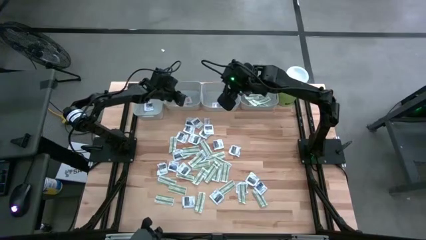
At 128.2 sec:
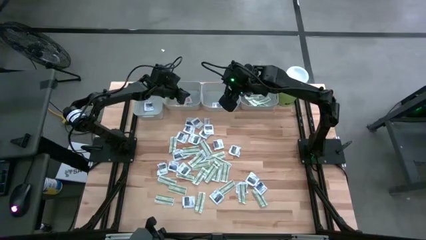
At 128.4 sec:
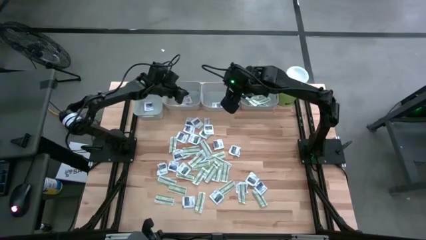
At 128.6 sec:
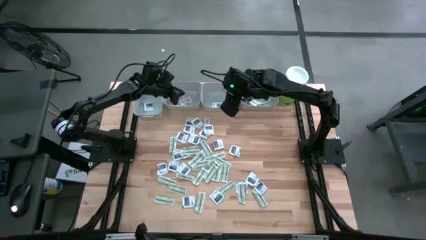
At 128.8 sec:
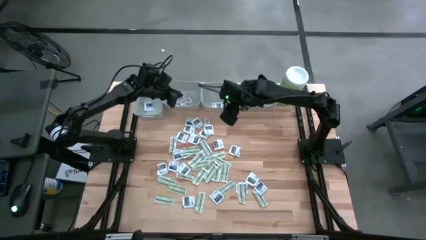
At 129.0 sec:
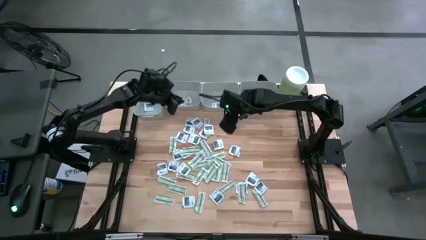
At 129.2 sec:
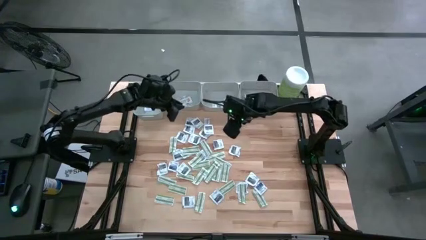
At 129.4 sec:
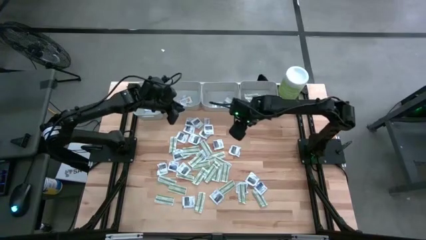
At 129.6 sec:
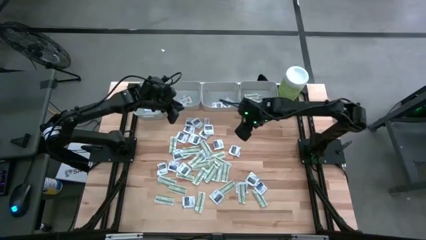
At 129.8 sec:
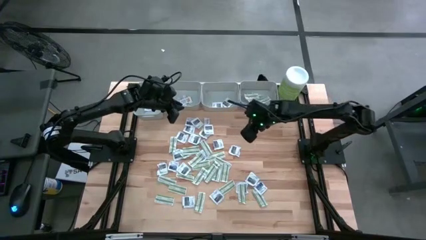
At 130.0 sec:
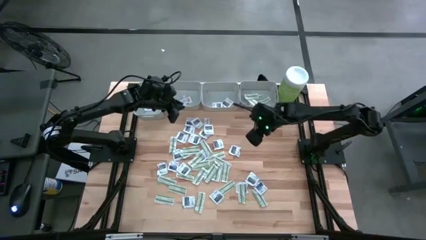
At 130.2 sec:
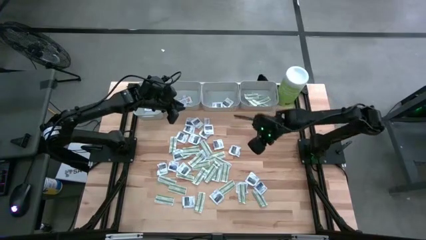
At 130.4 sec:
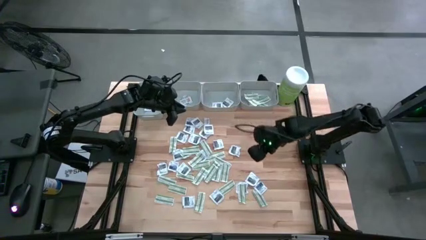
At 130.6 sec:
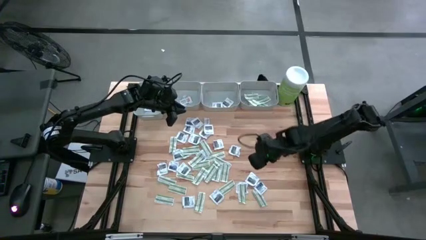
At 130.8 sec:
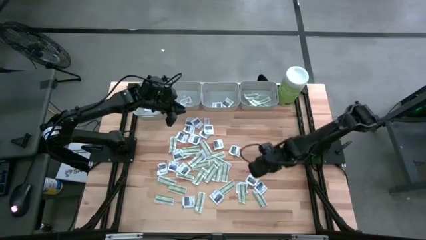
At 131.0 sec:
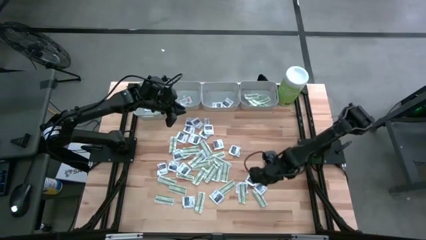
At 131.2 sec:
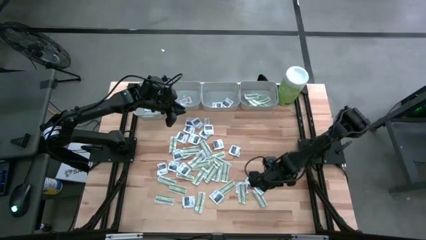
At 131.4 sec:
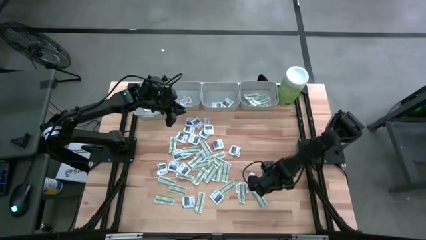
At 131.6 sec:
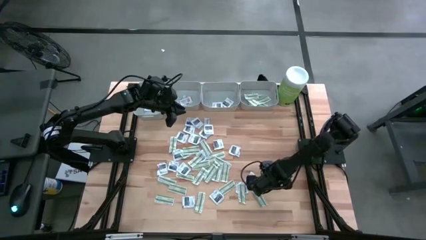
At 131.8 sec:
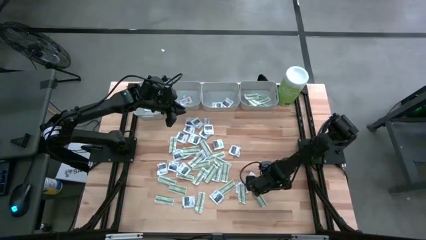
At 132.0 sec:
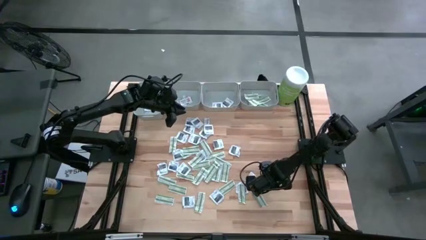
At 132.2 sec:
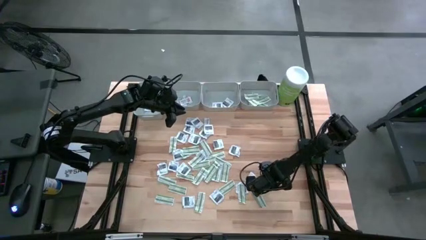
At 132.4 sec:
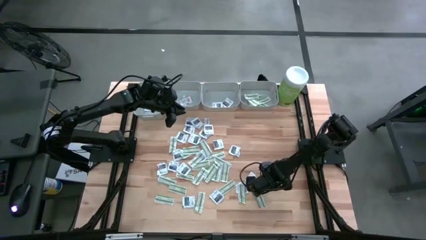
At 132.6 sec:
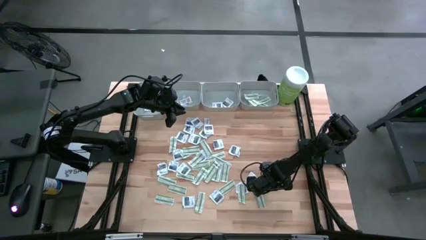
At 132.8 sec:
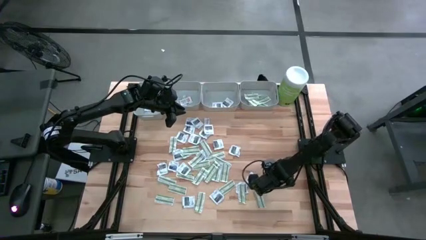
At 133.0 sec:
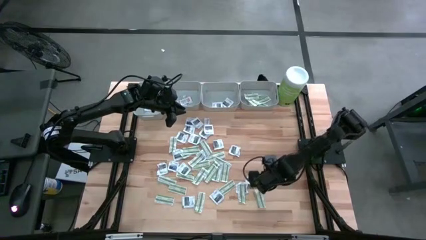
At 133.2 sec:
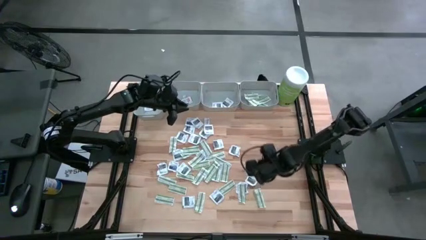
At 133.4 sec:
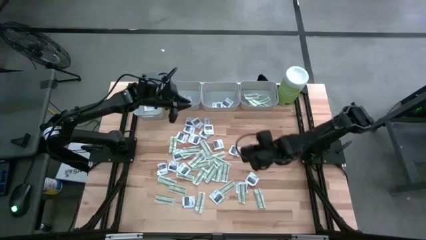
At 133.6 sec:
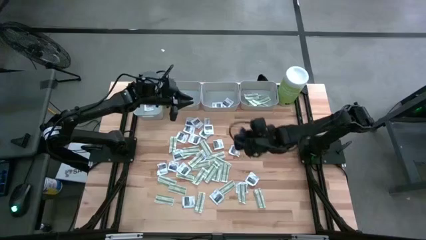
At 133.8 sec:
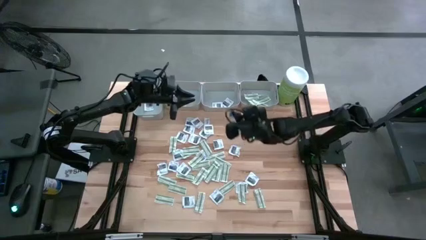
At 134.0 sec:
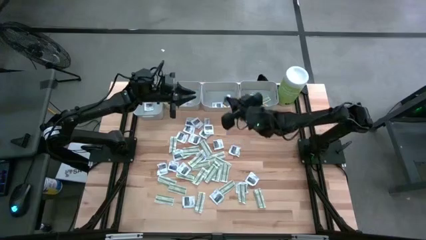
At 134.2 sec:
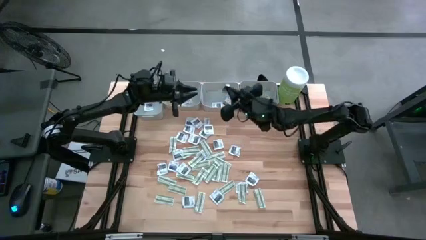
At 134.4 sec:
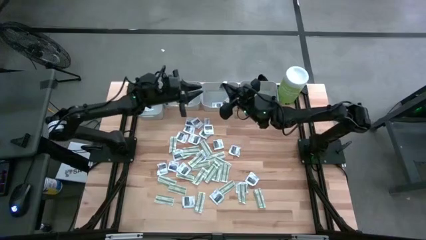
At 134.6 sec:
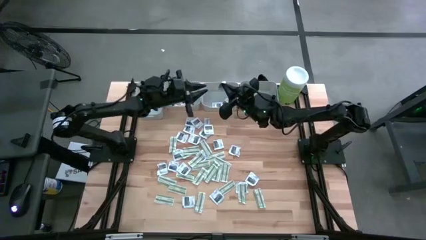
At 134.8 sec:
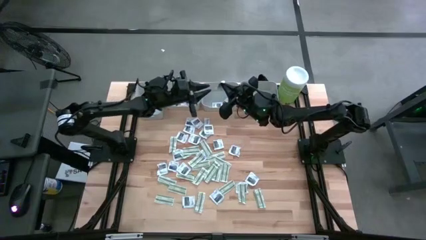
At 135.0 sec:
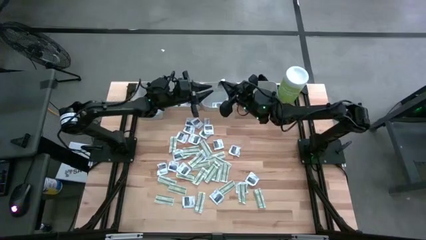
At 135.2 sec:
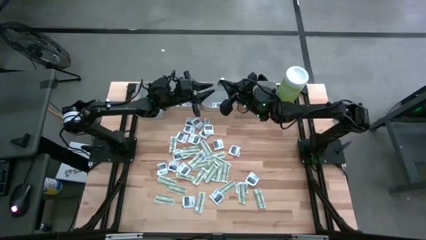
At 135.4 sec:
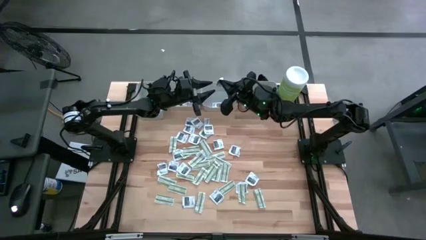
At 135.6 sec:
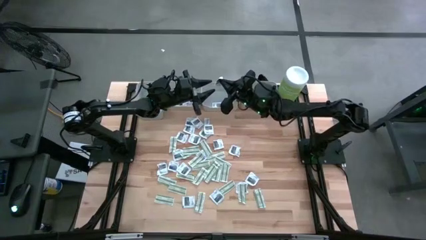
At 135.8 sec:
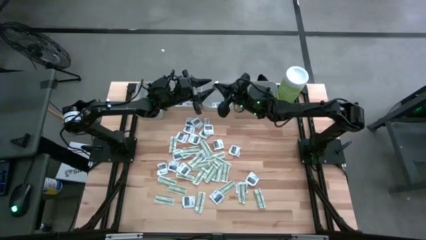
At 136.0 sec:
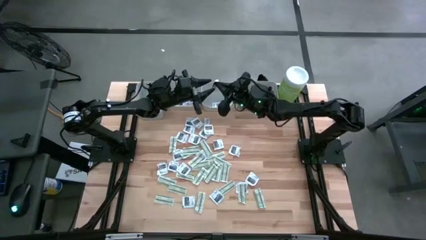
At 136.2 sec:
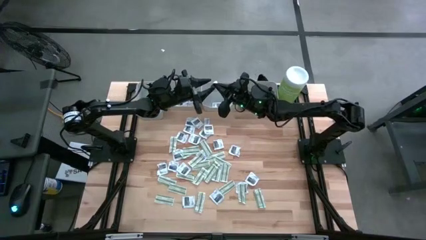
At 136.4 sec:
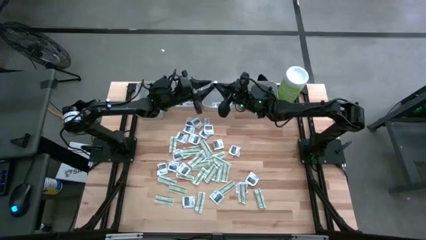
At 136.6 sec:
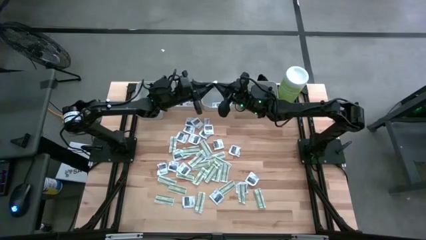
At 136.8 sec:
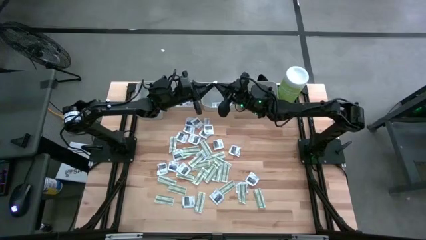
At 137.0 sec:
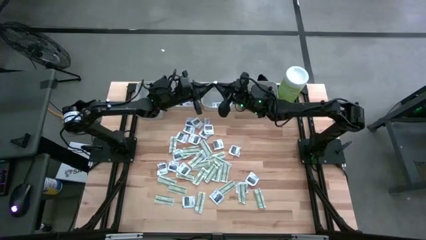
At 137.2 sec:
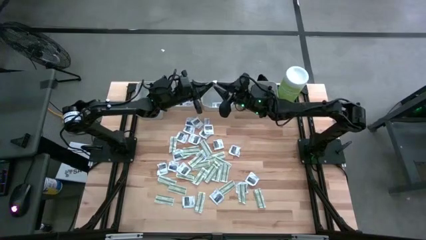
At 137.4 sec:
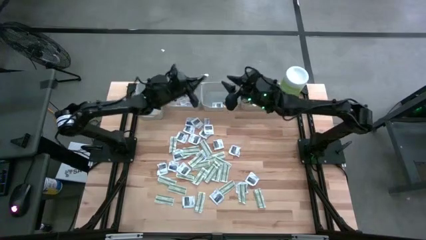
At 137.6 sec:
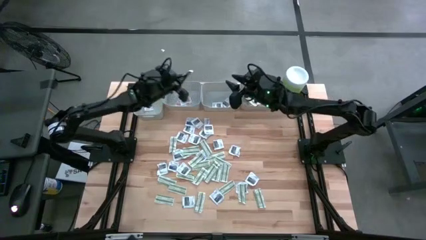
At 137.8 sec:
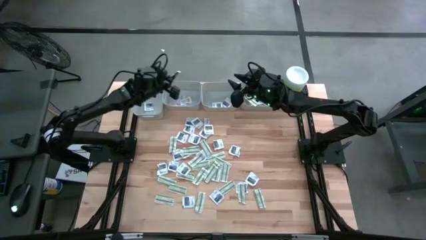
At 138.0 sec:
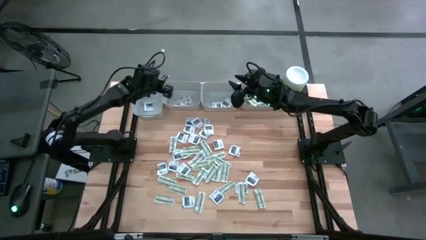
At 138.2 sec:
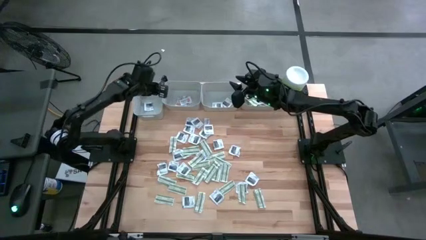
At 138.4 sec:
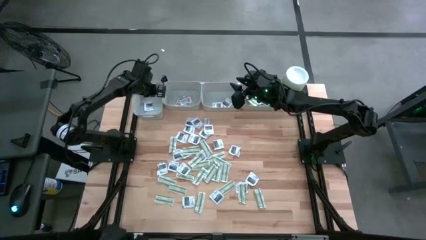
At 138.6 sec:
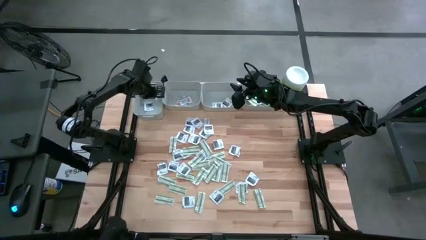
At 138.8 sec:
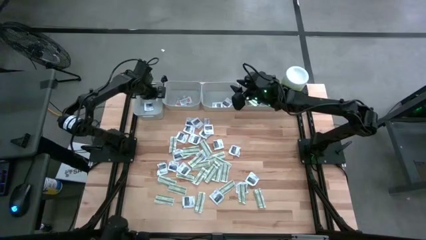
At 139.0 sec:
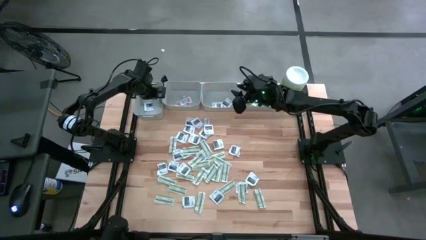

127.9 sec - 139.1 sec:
Task: Pick & Place First Aid Supplies
Put the blue alcohol pad into the left gray bin

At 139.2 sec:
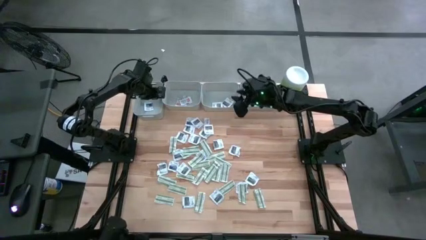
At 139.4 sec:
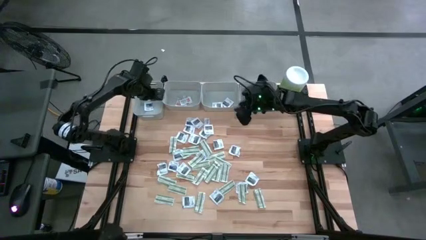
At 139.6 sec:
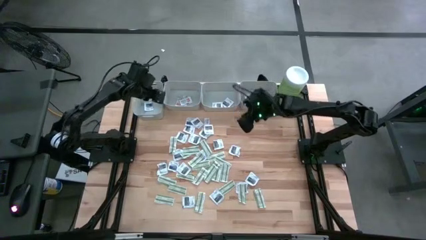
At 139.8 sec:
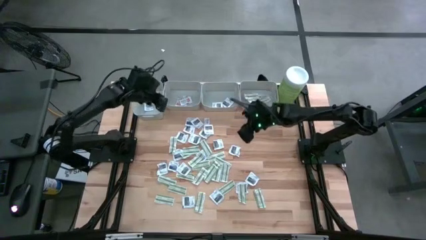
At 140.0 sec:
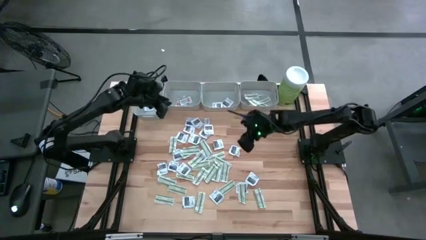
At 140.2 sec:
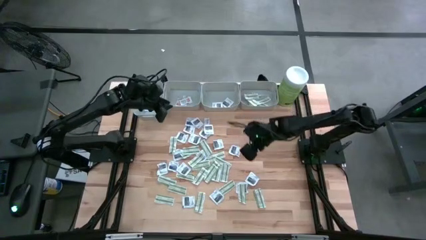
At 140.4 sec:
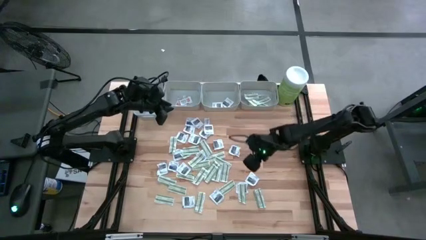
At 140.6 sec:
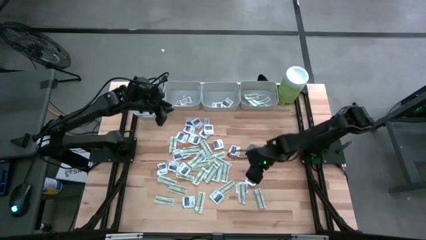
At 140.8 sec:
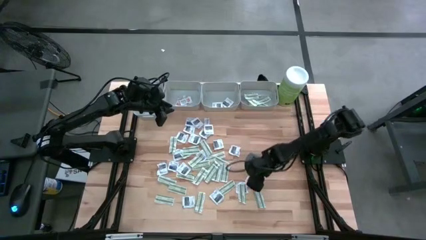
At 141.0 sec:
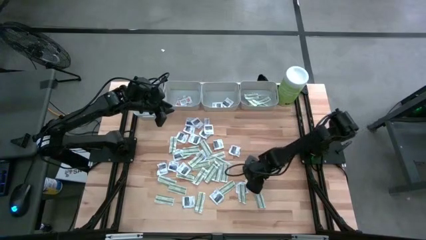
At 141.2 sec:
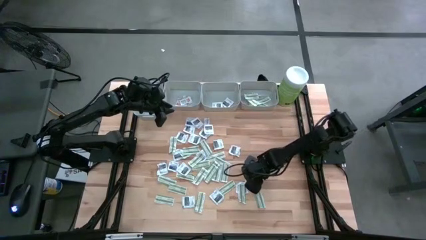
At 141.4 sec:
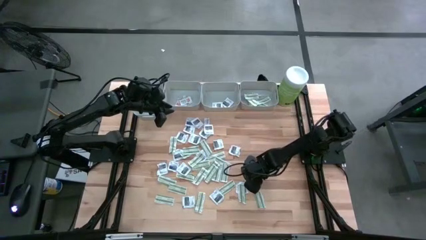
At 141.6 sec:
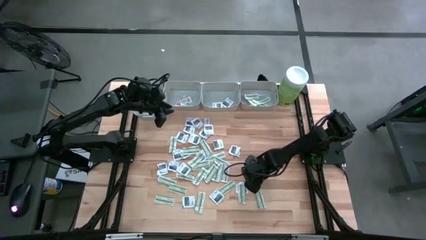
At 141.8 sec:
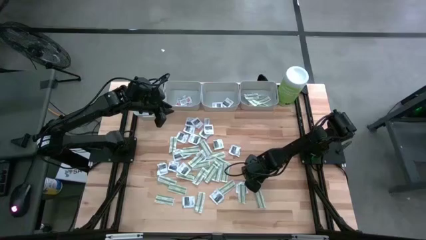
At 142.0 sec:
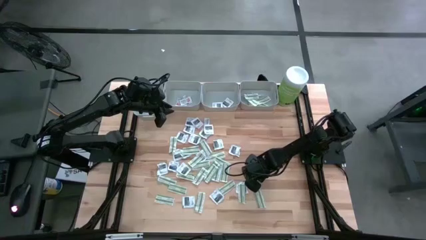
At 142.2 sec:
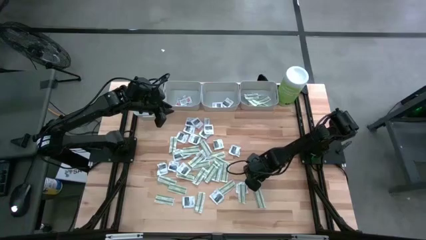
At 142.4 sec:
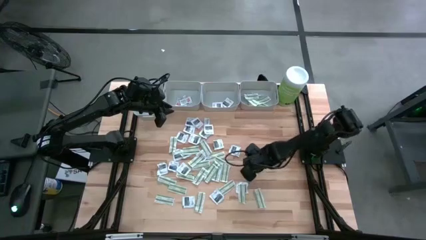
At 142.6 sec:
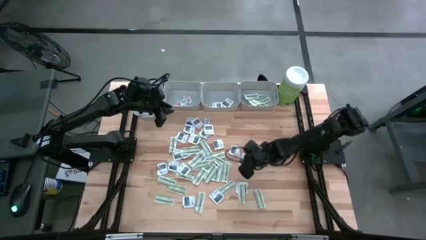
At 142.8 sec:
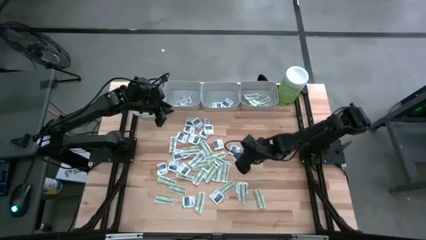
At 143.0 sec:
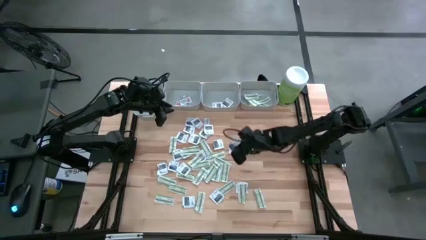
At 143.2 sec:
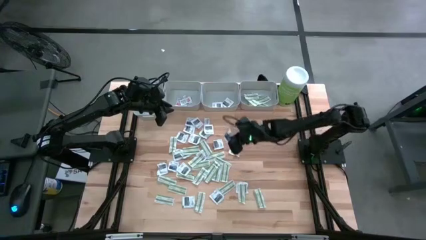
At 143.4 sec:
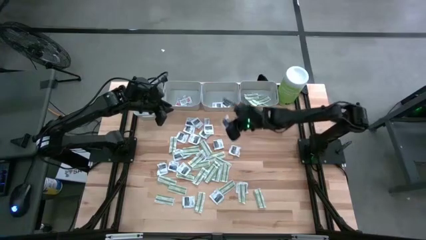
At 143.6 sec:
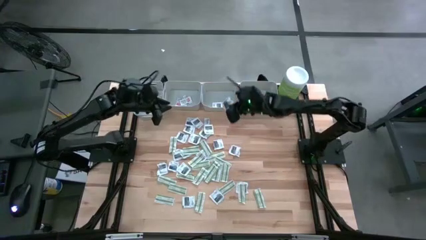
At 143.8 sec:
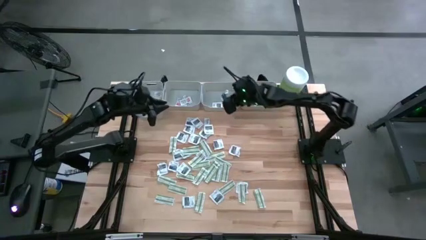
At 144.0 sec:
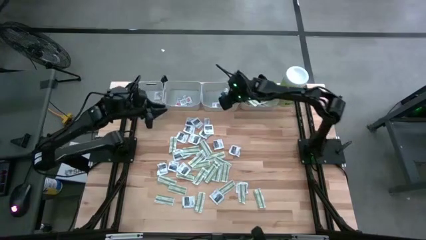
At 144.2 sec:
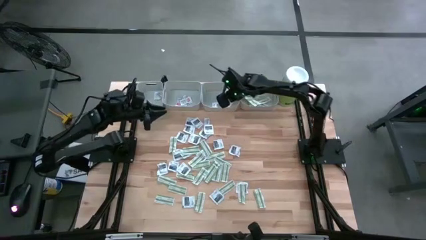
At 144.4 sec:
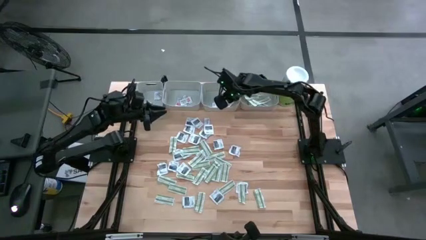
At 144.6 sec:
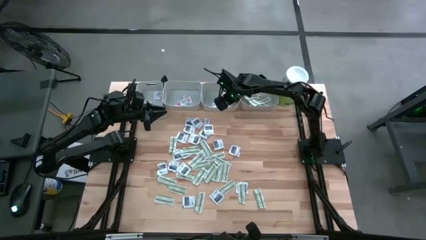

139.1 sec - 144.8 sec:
Put the gray towelette pack into the middle right gray bin
